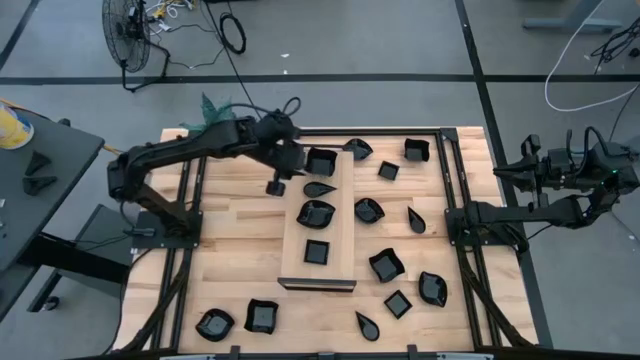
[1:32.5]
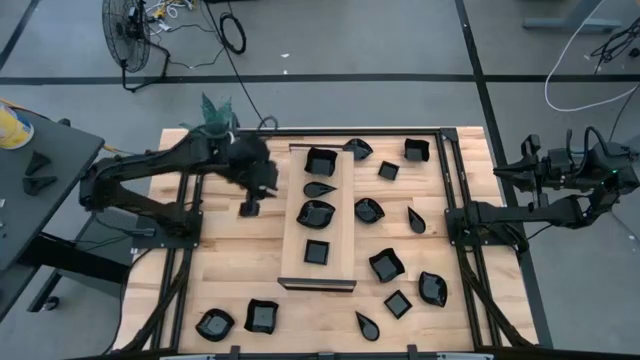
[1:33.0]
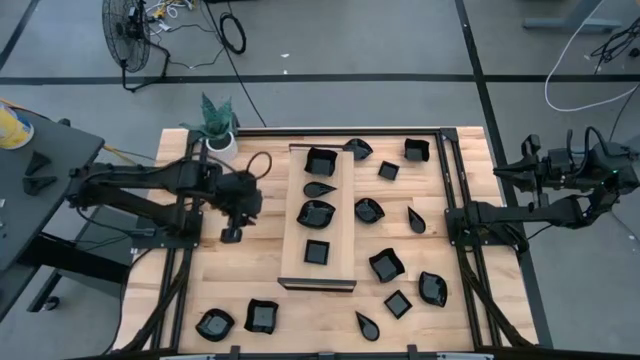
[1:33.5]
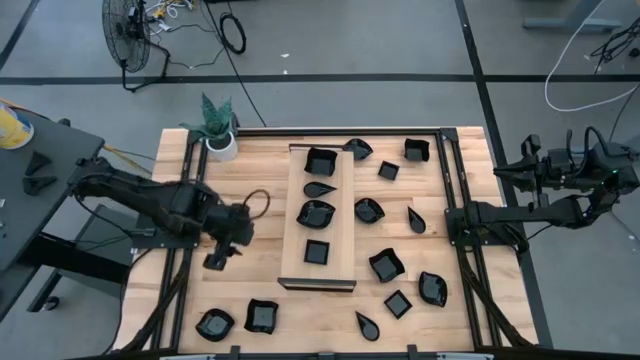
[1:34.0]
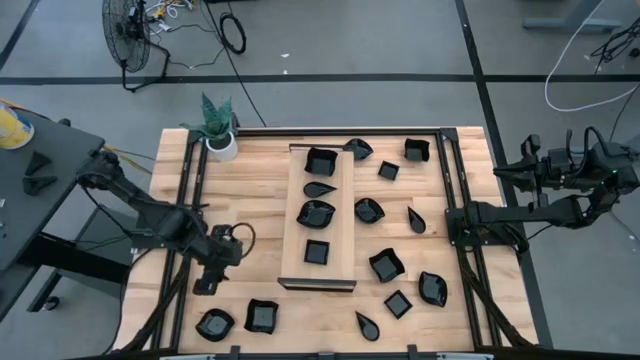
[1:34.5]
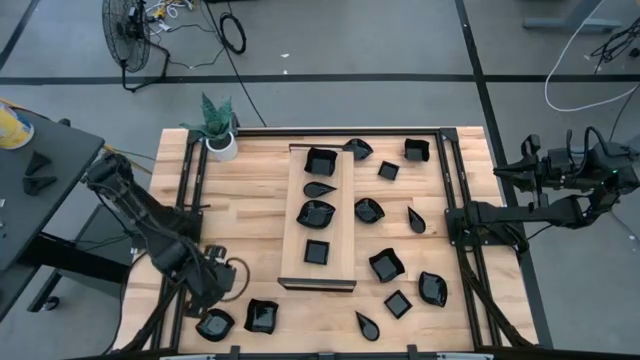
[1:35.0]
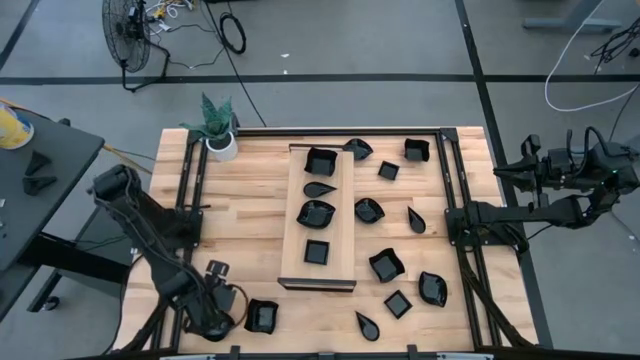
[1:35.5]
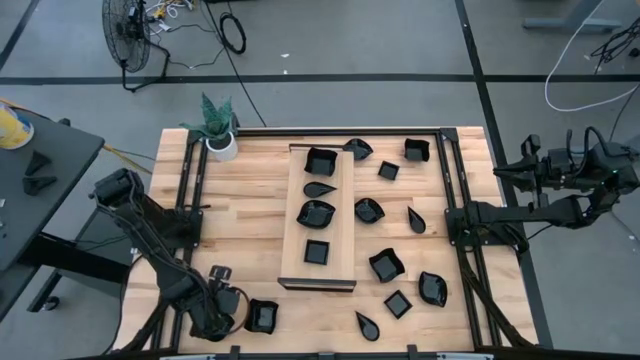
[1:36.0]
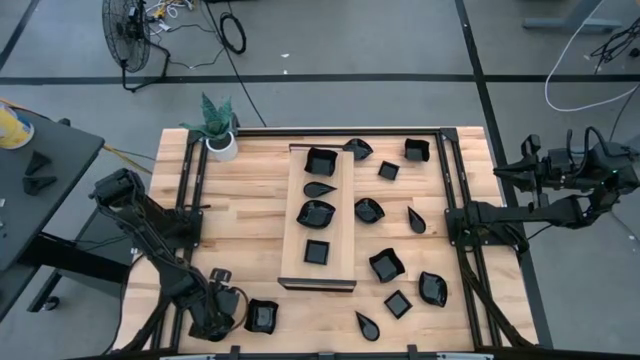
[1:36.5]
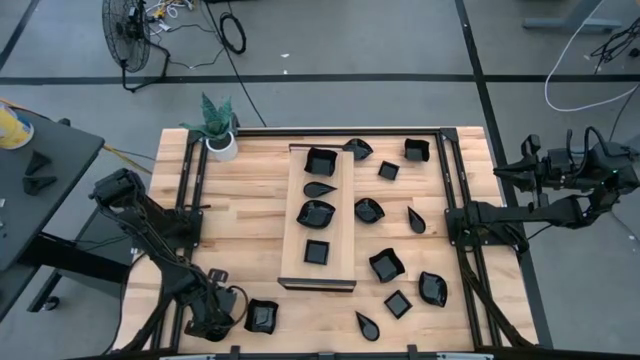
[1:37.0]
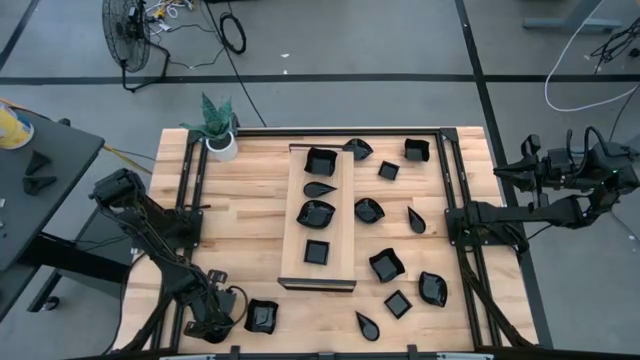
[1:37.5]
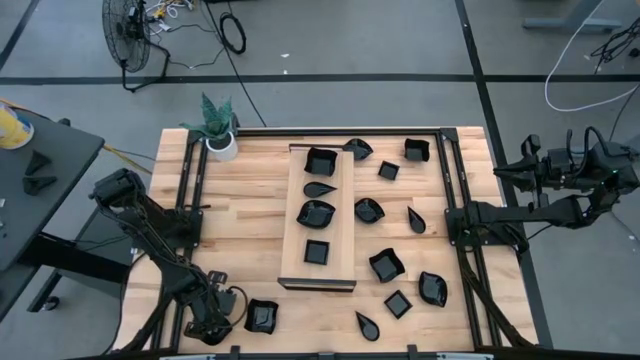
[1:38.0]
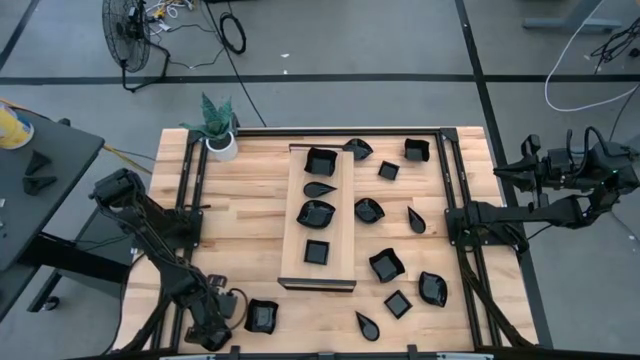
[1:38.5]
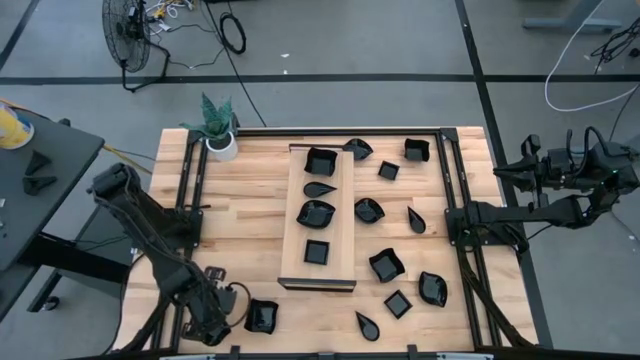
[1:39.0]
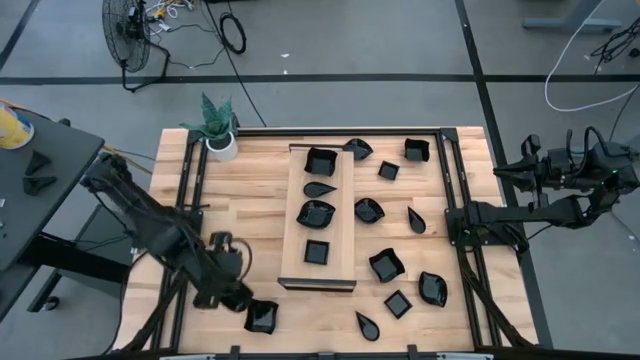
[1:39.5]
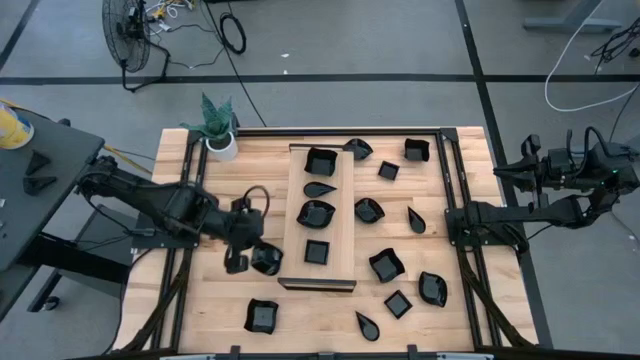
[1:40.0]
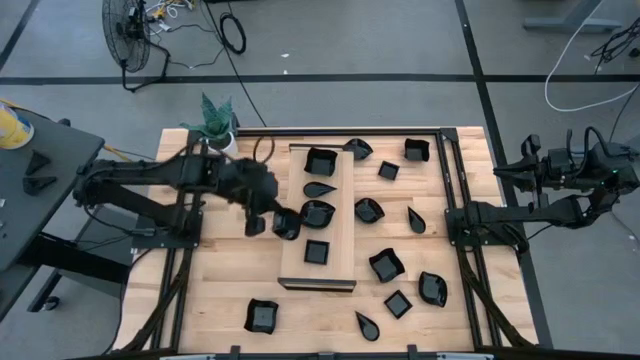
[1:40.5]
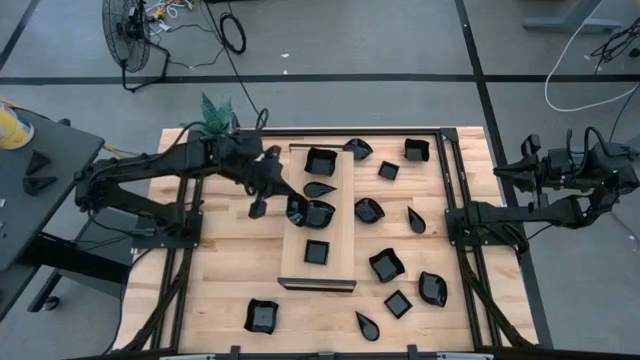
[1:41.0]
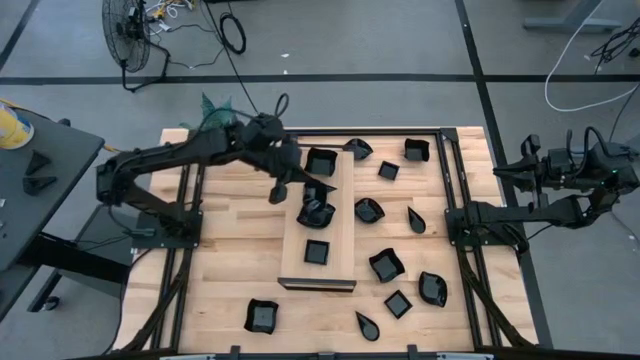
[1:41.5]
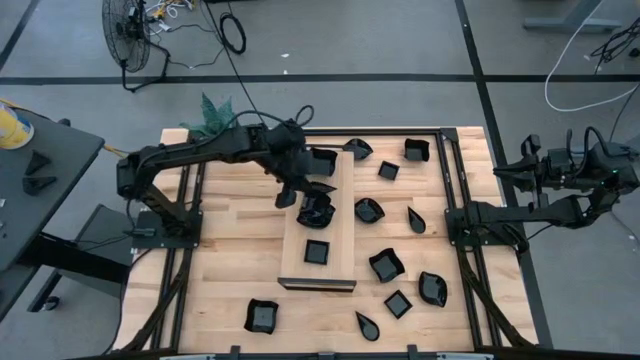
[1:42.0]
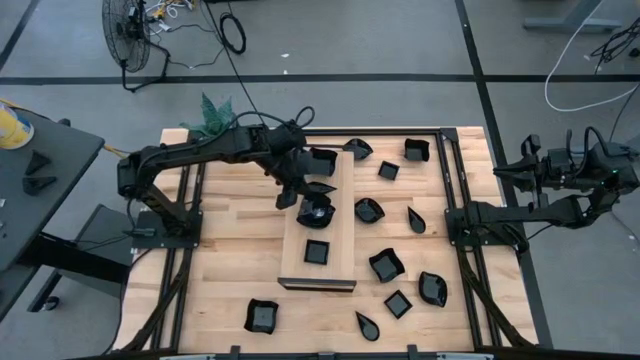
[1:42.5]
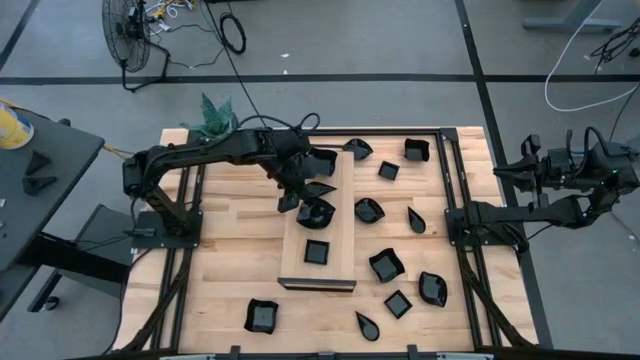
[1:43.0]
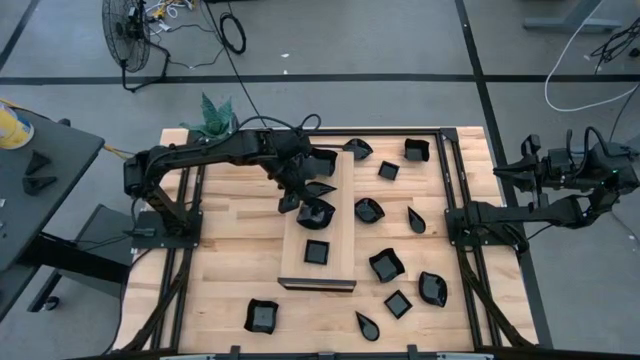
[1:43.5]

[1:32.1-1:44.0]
Task: Pick & Place Mini shaped plates
Stack the leaf shaped plate on top of the leaf shaped plate on the shelf

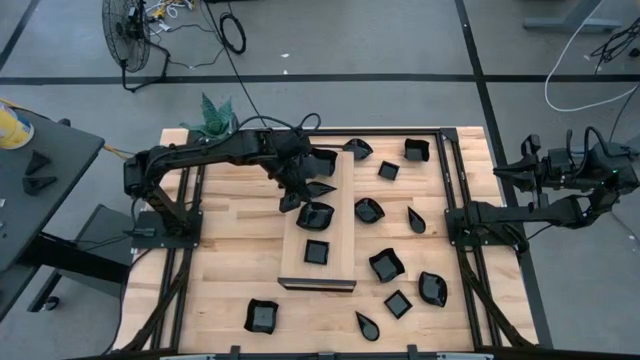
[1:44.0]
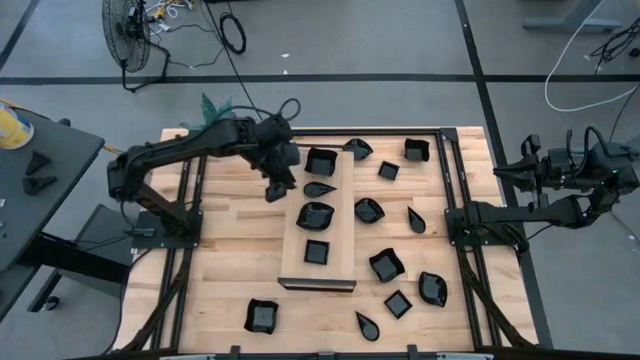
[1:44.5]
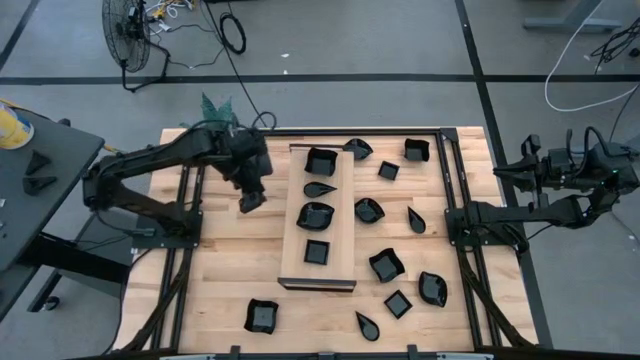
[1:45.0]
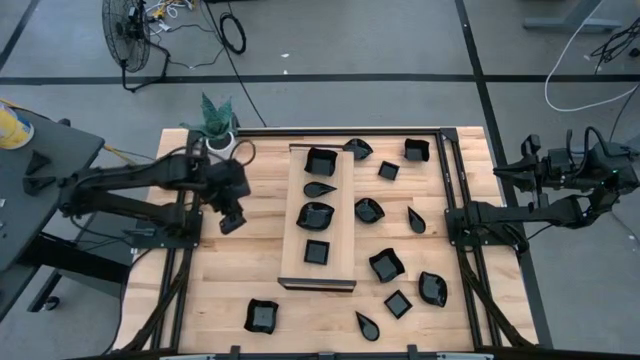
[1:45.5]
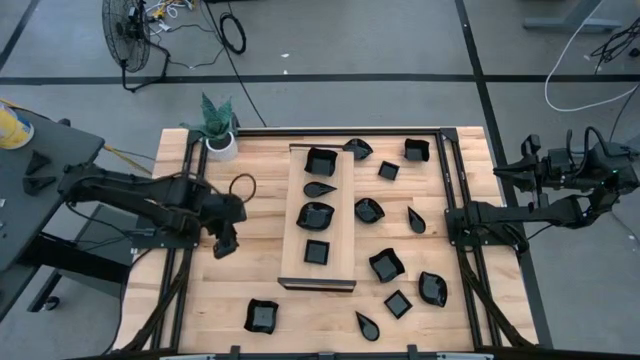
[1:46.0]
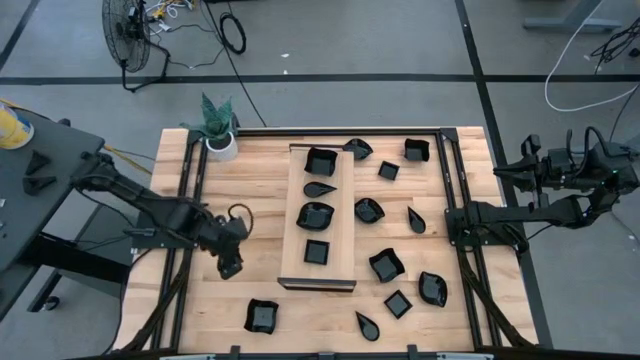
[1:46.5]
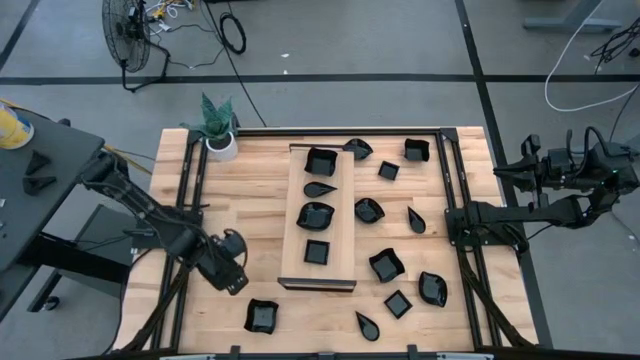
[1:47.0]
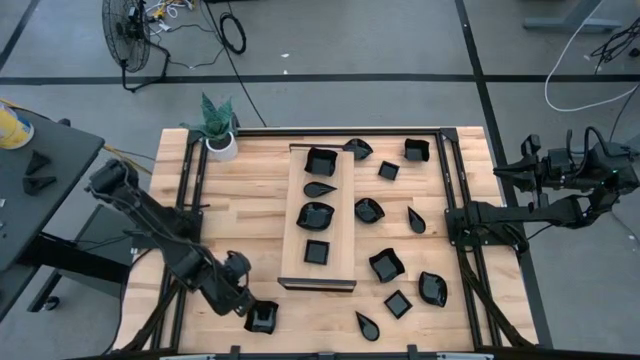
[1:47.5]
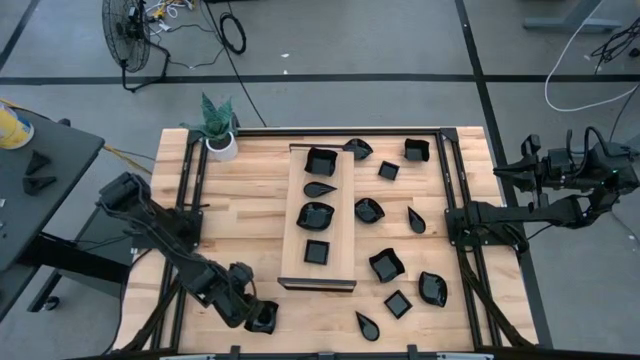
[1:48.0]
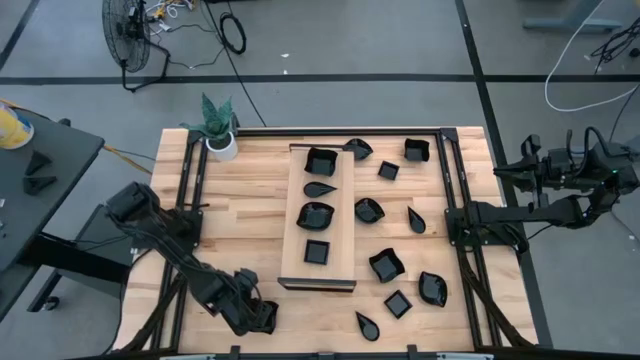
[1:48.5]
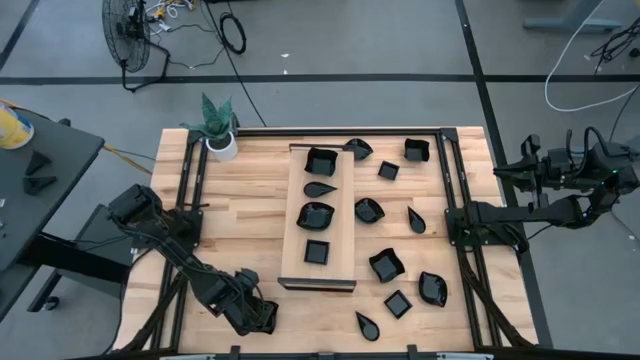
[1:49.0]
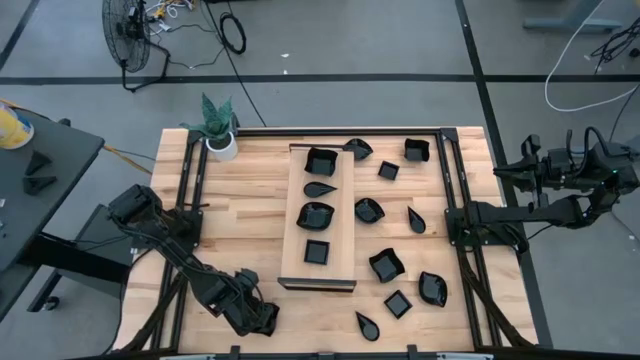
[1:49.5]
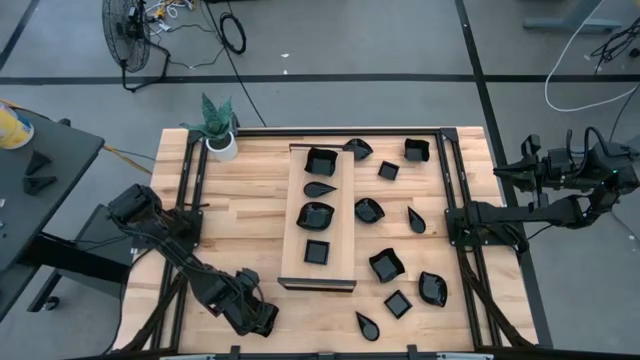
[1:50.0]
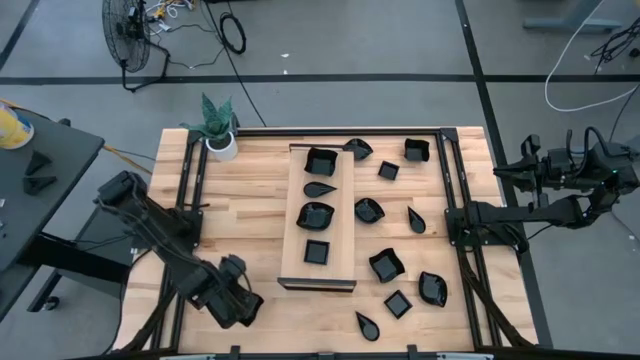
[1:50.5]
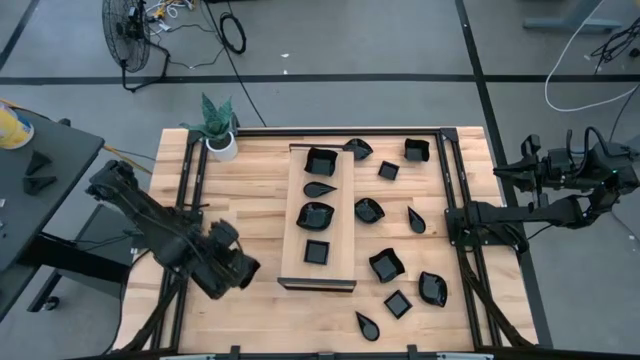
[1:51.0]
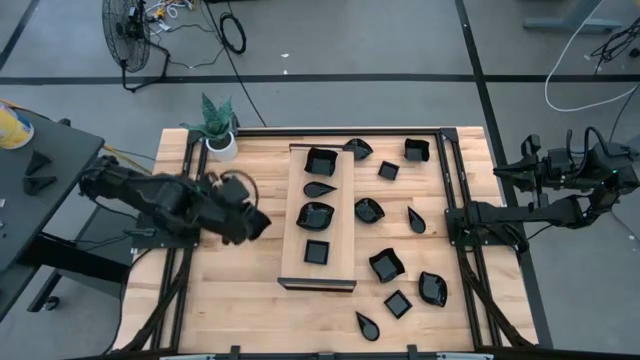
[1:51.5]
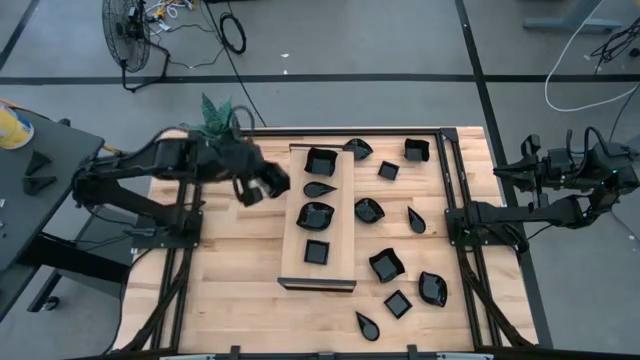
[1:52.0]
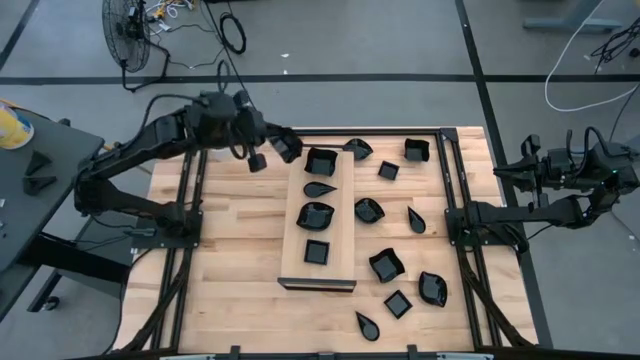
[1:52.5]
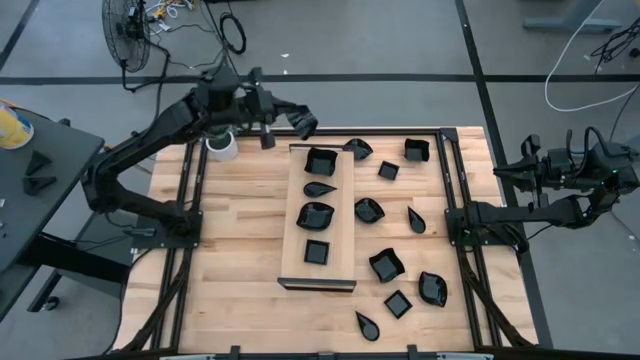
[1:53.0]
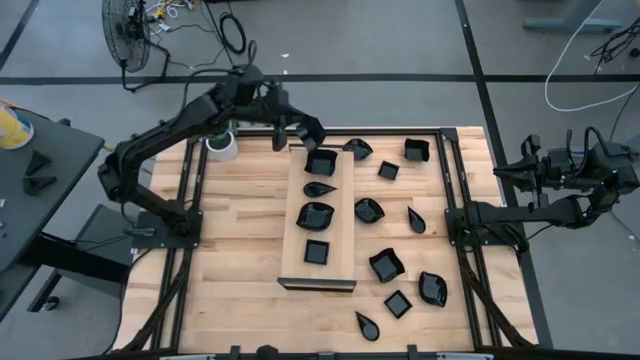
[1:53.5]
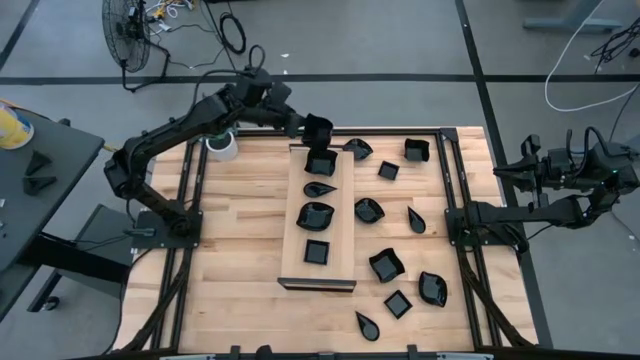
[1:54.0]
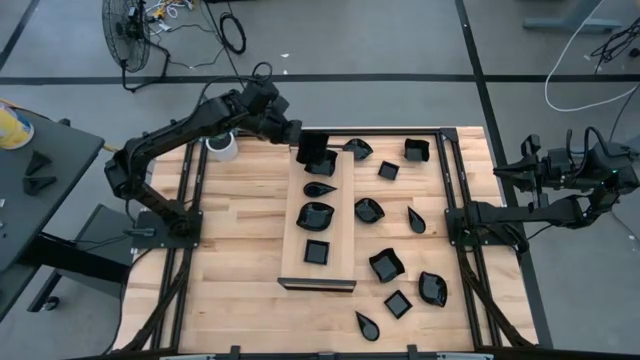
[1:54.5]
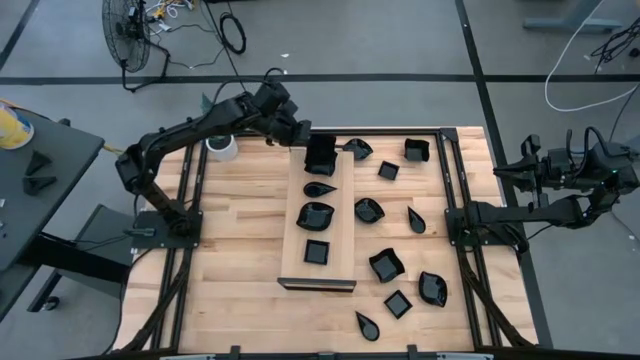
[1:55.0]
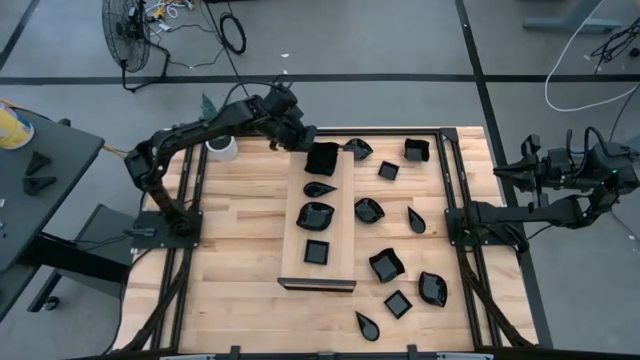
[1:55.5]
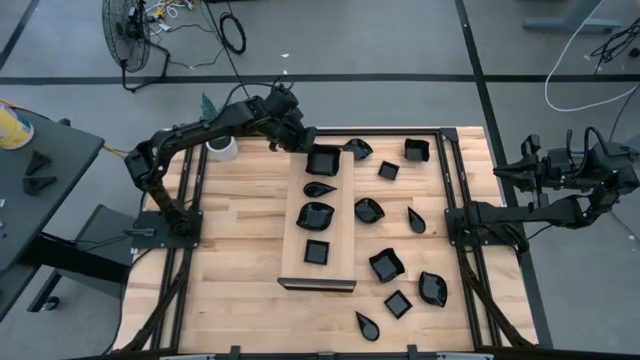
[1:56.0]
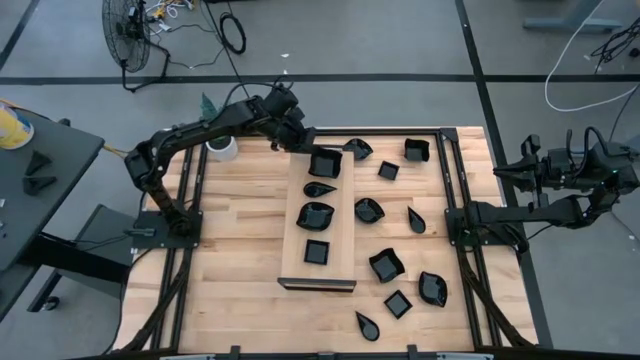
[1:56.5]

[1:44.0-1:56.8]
Stack the distorted square plate on top of the distorted square plate on the shelf
